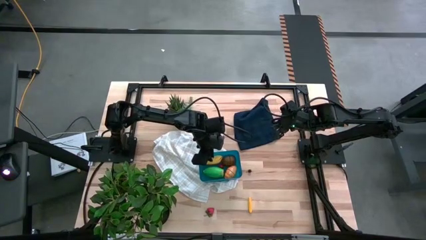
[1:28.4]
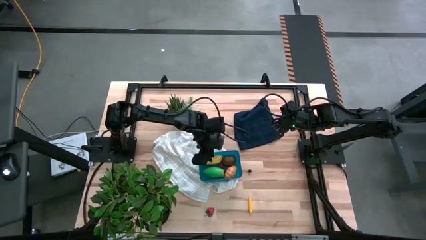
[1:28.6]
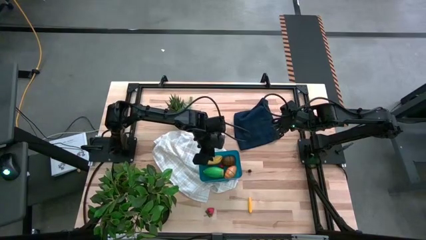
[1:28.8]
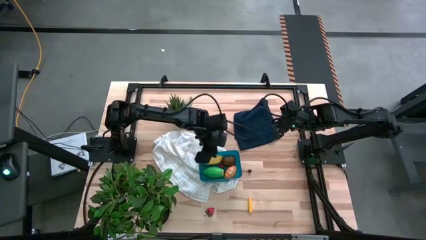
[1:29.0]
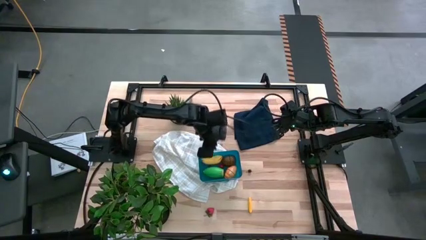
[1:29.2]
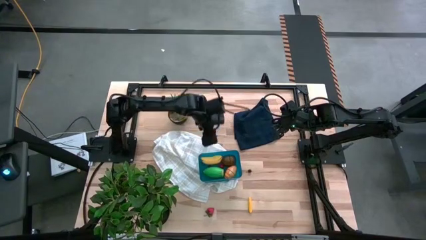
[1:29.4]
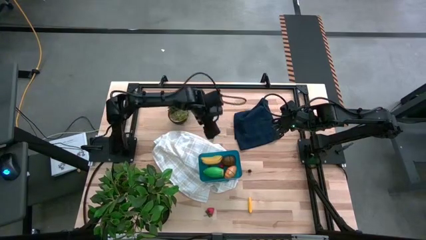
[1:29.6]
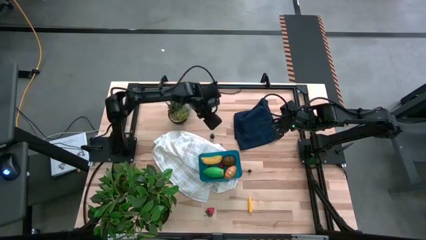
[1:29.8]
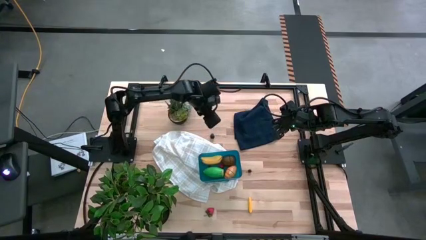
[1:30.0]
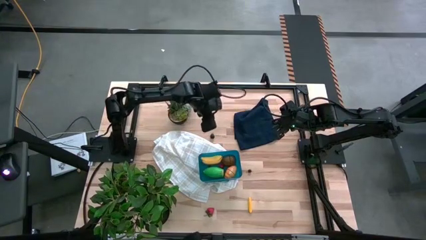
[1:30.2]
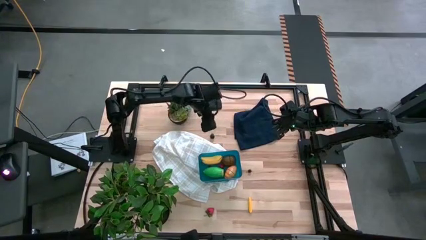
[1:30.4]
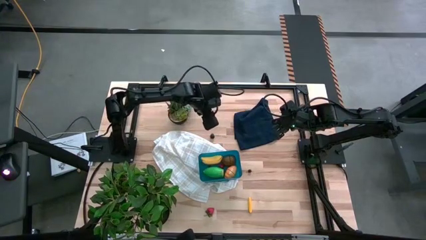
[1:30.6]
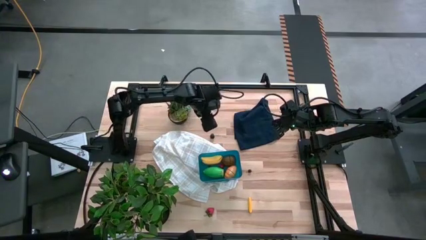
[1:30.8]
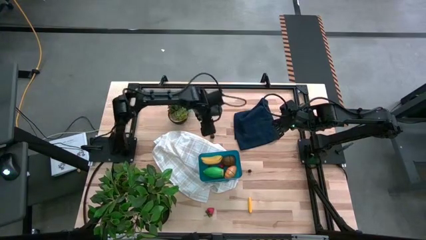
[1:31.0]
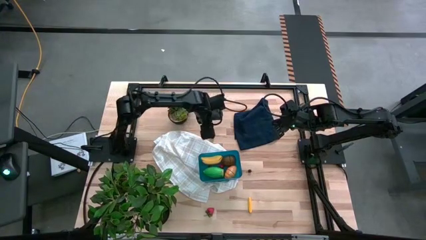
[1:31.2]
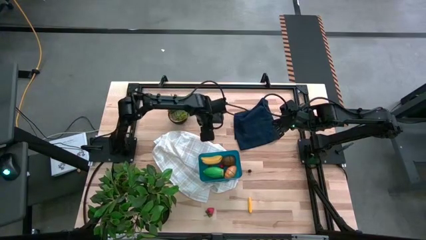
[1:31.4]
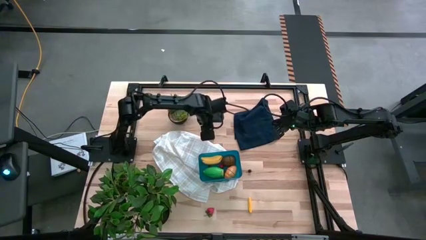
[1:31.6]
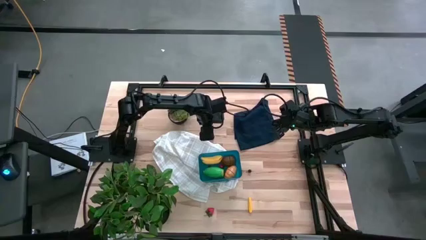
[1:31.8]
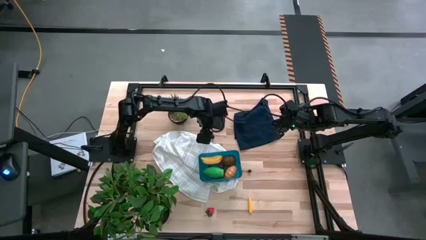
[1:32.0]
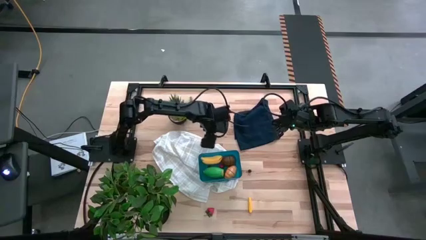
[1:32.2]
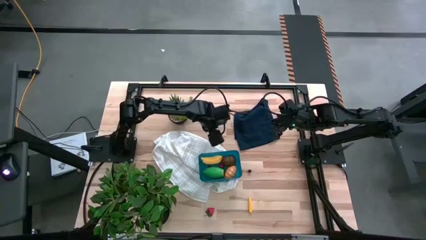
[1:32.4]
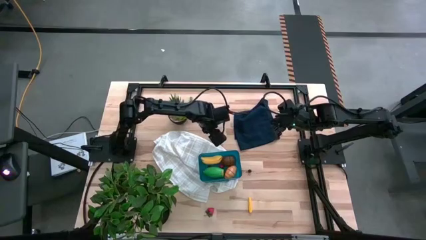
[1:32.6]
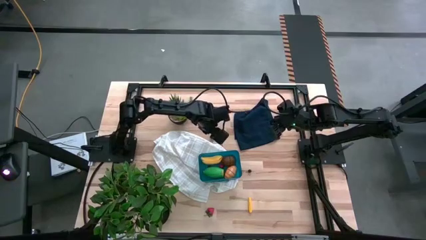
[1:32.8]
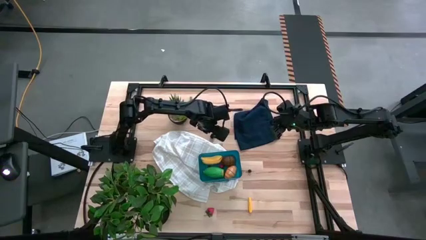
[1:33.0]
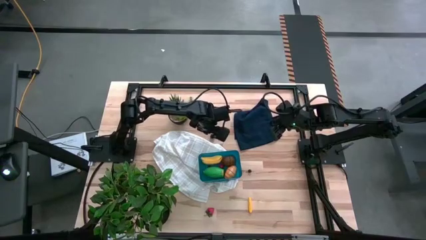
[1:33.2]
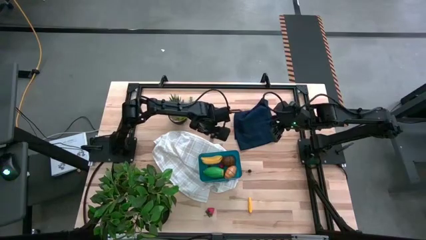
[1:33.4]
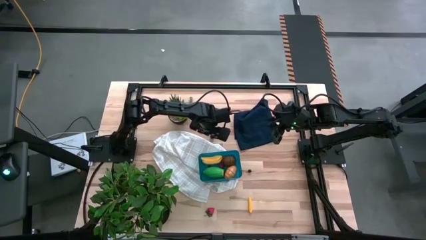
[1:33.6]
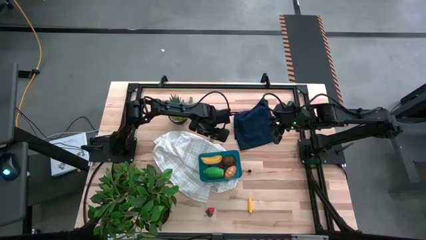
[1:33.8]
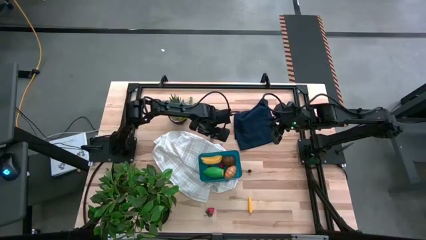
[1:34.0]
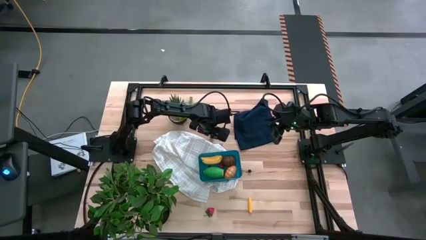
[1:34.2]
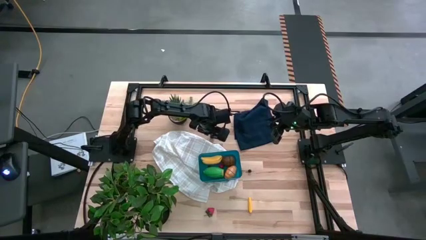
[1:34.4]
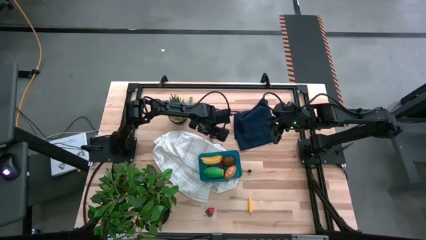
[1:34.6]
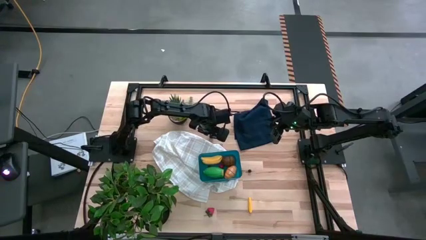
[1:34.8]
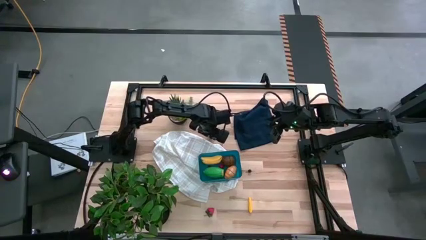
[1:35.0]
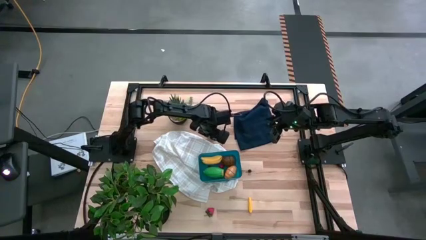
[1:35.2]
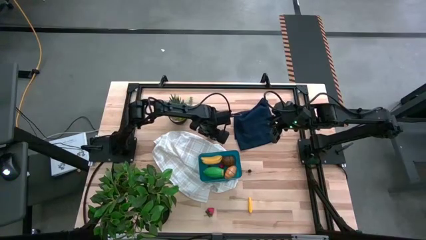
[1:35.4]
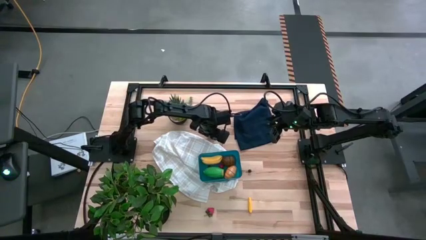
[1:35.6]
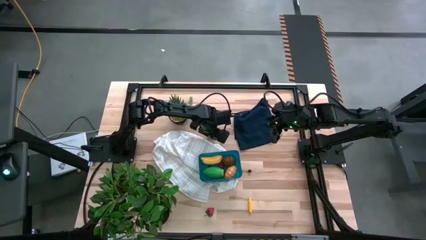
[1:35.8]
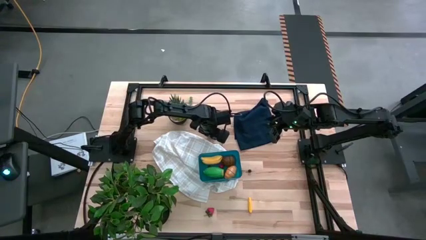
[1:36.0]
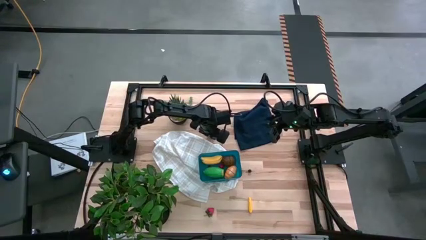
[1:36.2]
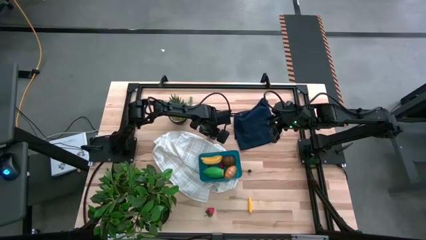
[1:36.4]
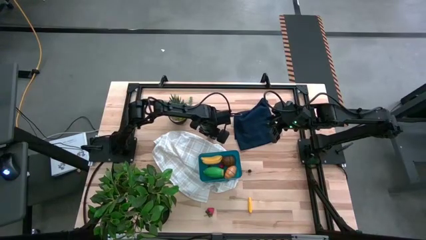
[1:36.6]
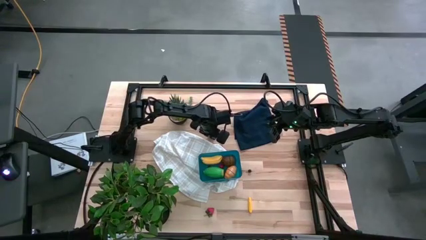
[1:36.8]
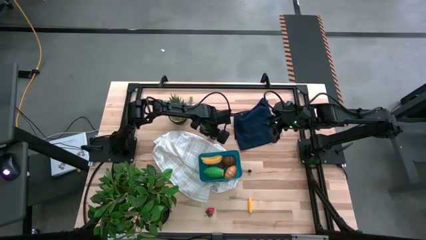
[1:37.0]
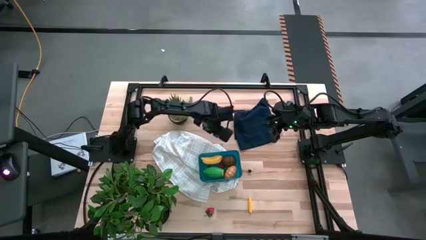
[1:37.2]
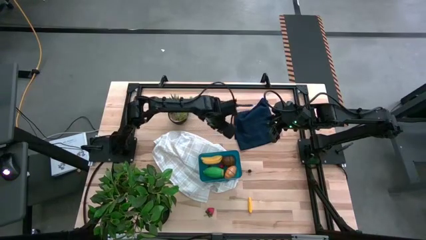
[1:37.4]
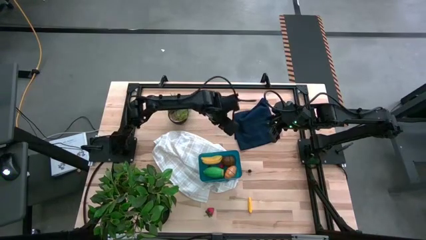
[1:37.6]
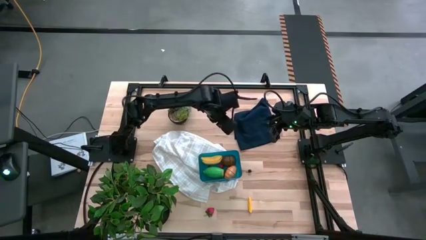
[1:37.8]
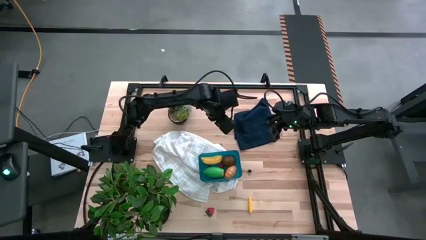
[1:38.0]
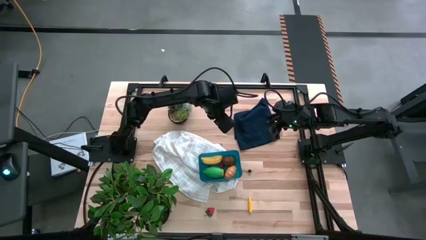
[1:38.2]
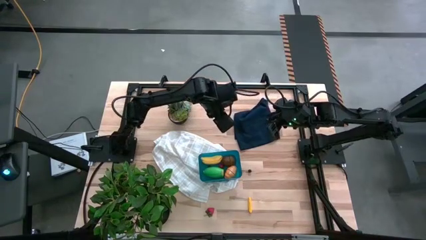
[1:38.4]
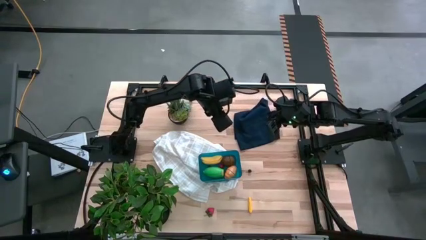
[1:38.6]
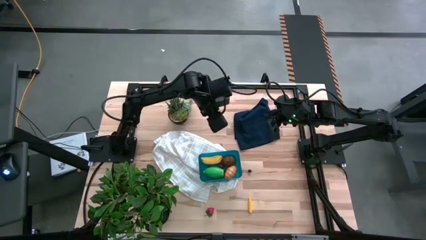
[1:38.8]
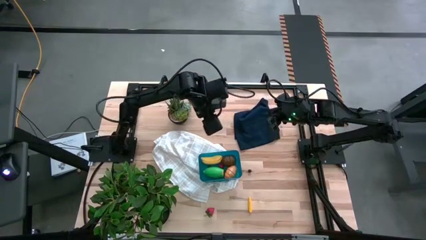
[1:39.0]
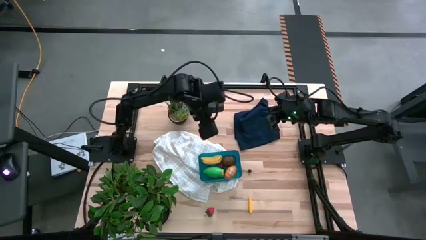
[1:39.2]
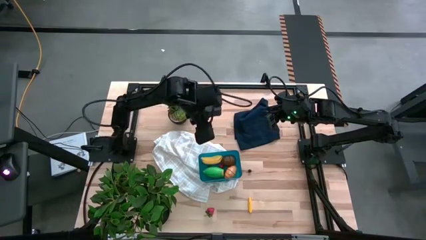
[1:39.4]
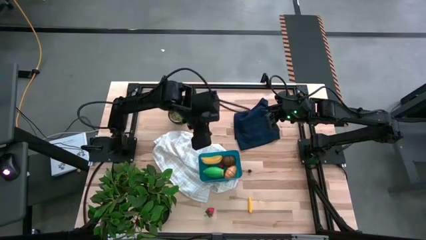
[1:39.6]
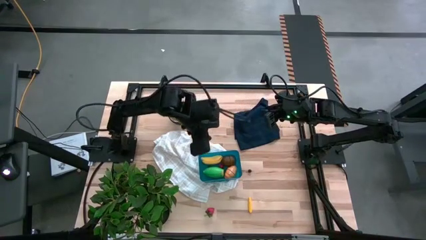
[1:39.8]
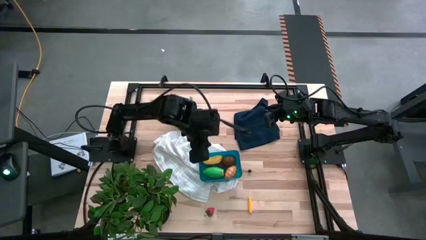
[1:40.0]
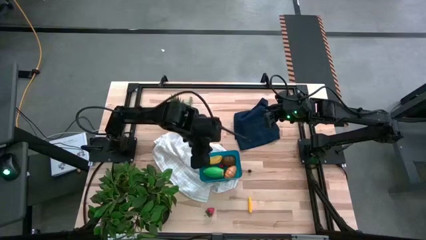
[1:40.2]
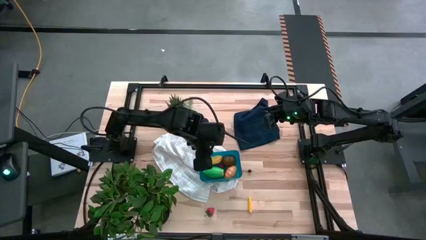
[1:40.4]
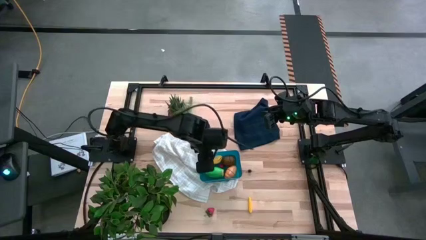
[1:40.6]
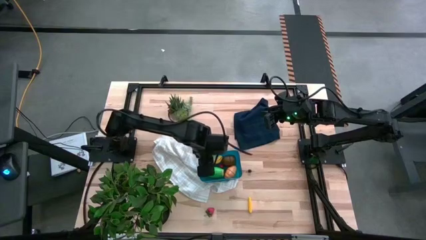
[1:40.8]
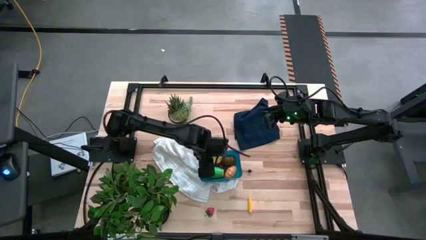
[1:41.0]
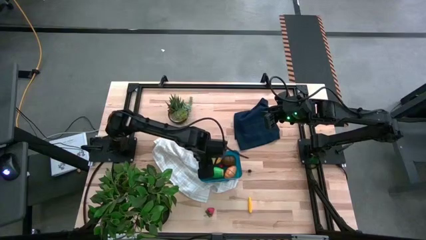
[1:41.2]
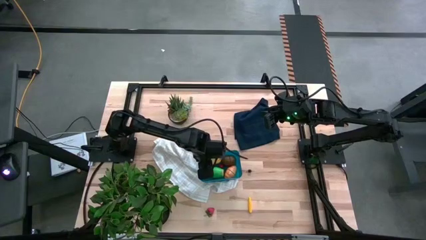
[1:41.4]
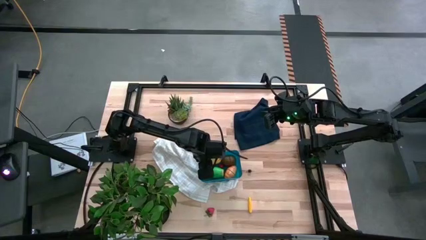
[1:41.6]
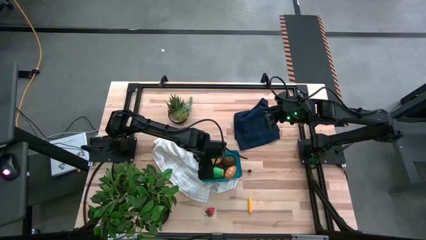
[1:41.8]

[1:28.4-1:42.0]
Task: Pick and placing Produce into tupperware
Put the blackberry into the blue bin

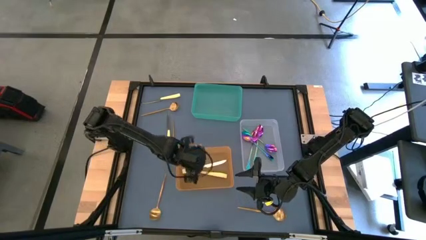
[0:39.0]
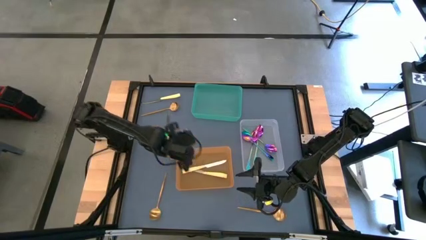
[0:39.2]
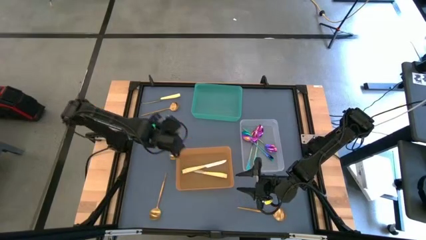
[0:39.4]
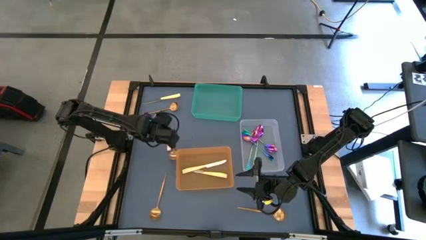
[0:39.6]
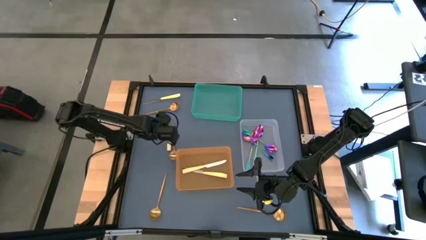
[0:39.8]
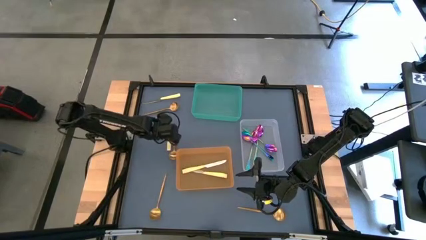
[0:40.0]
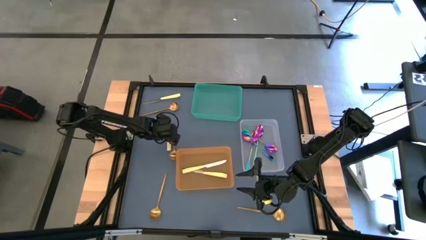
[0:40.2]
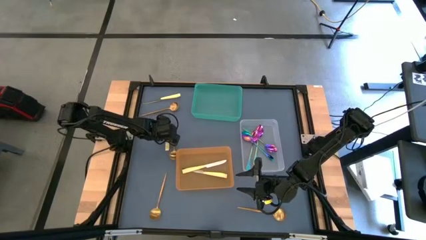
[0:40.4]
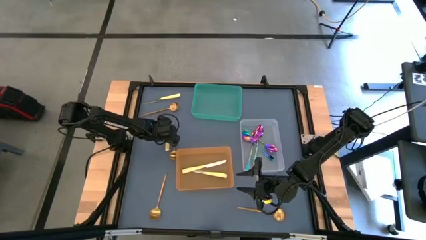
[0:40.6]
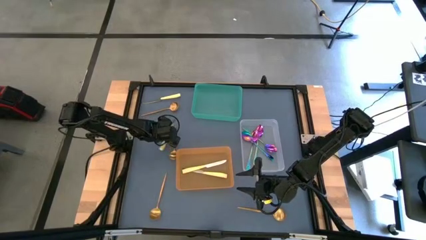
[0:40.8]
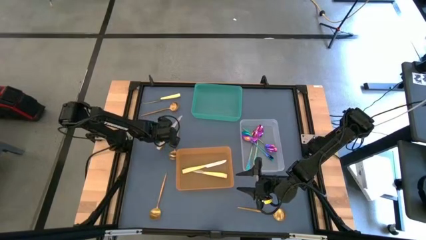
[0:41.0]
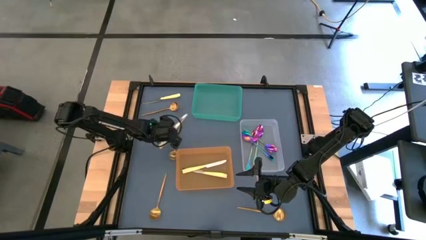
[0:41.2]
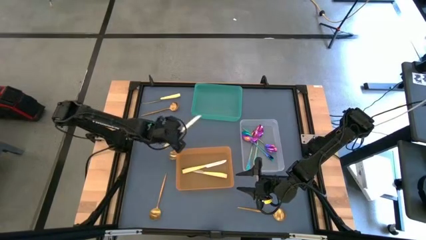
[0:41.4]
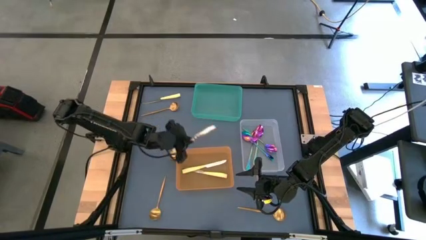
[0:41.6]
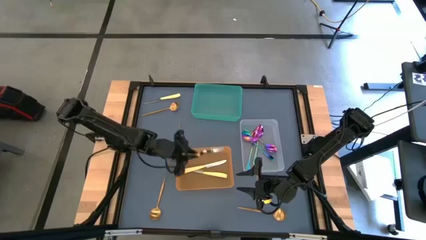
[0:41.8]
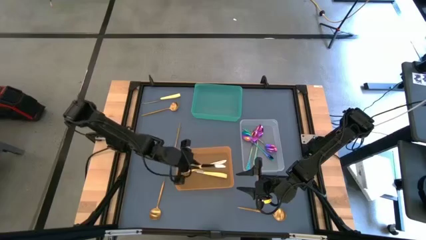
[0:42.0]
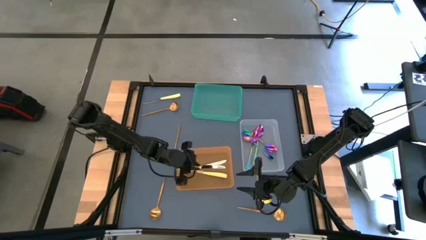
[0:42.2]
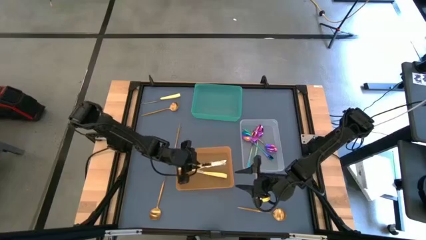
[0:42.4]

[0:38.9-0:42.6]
Task: Sort silverware by color (type)
Put the yellow table knife into the orange bin
